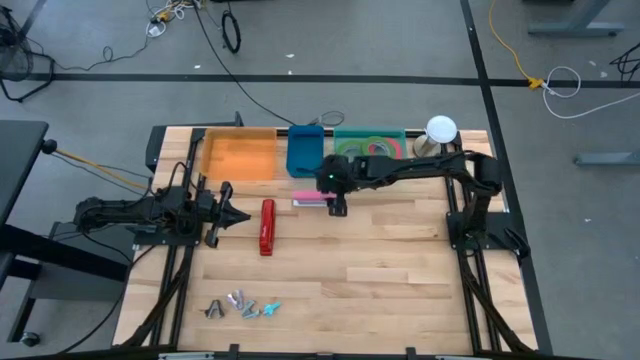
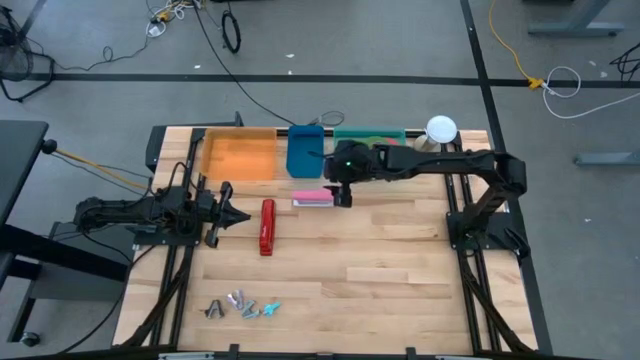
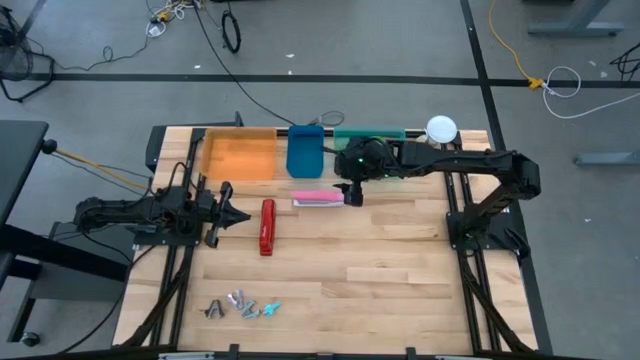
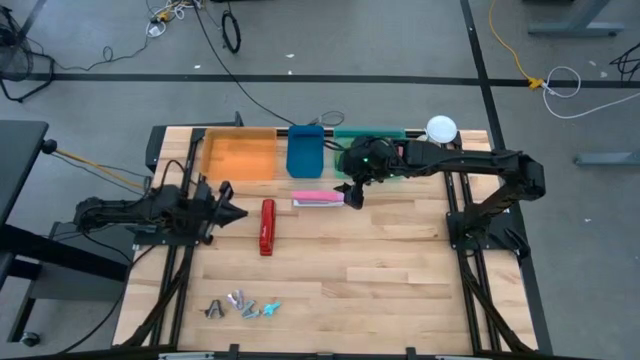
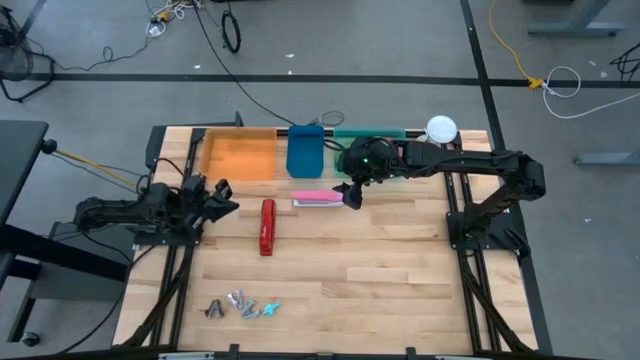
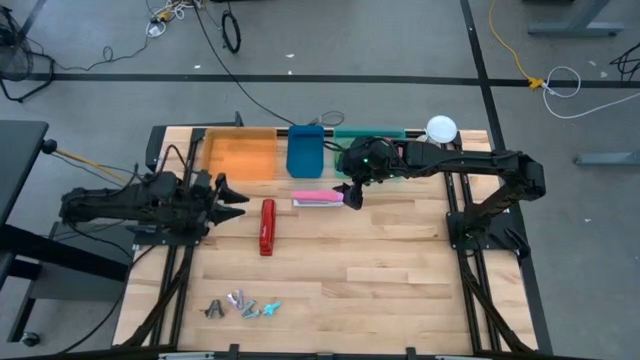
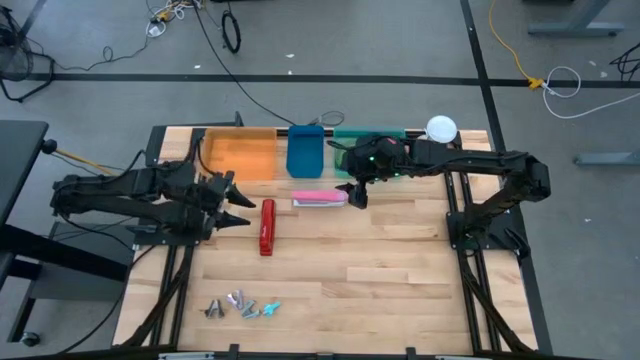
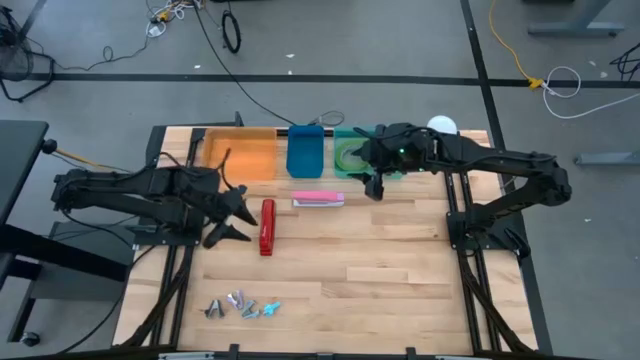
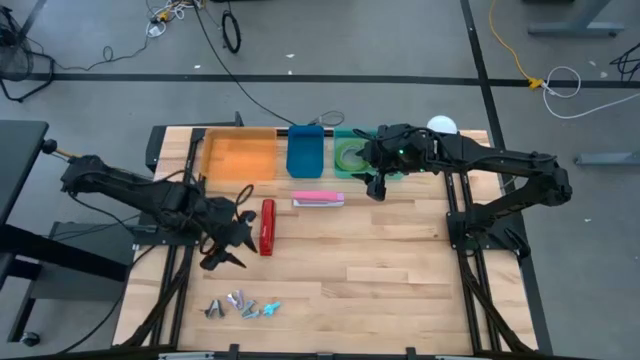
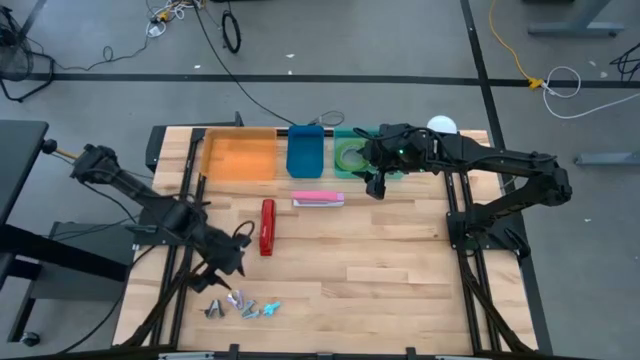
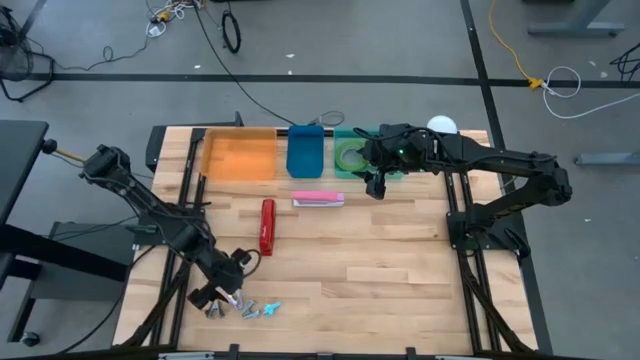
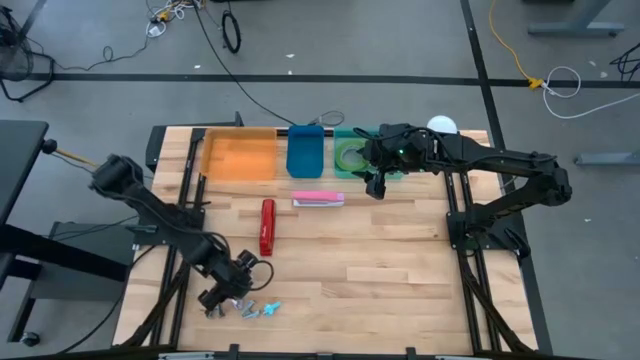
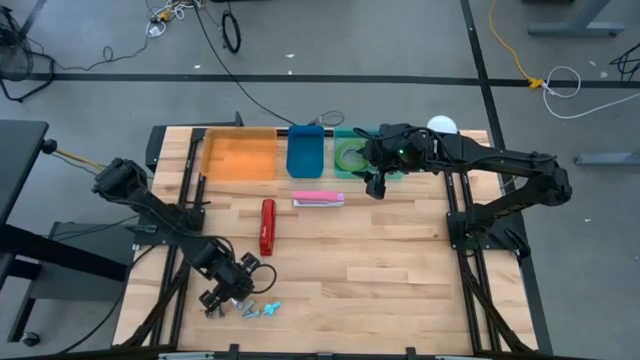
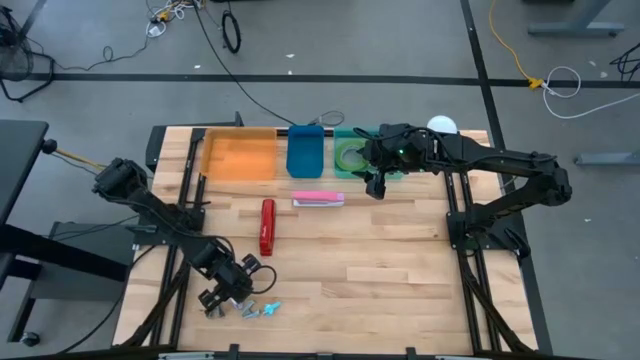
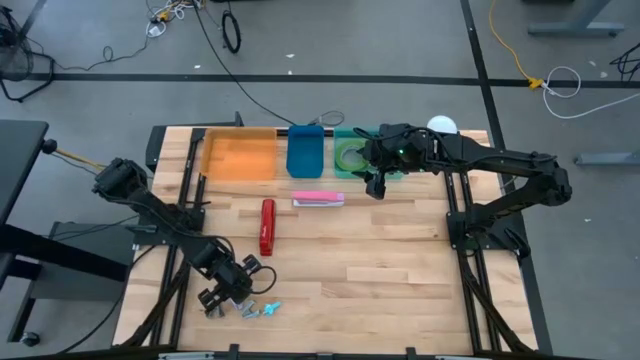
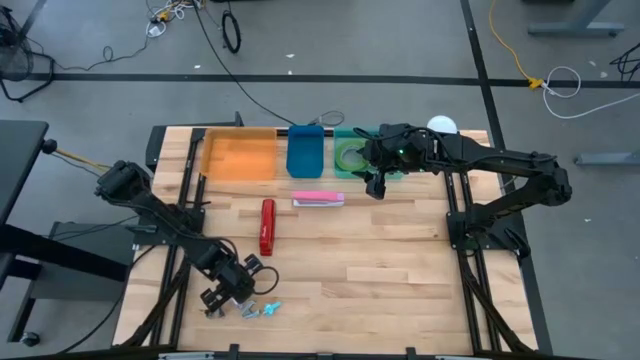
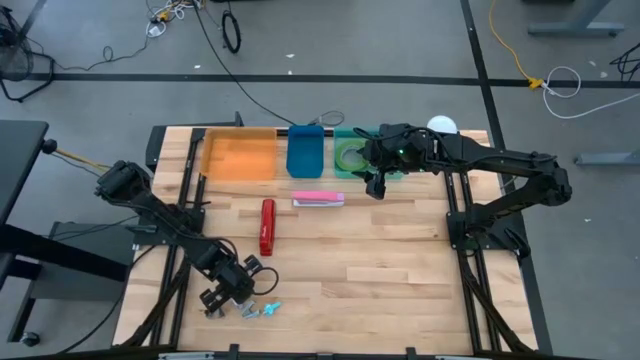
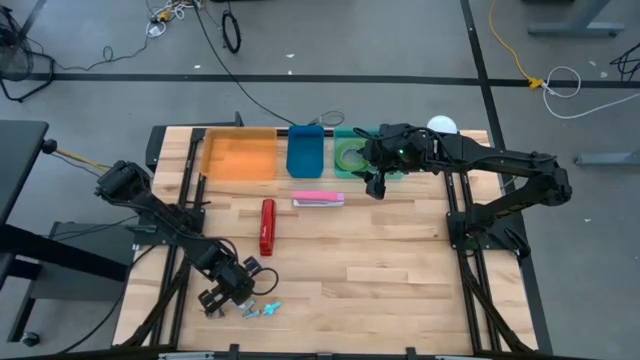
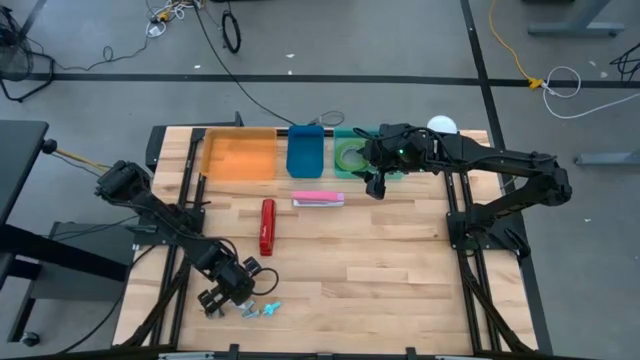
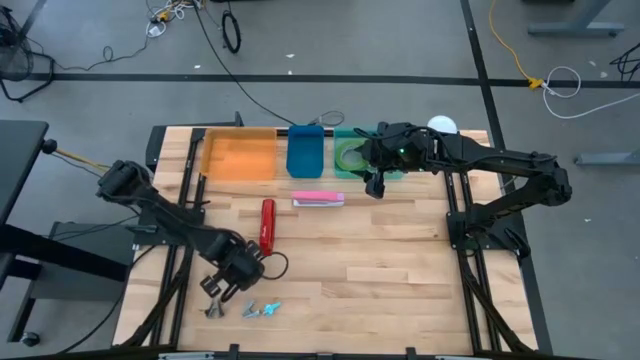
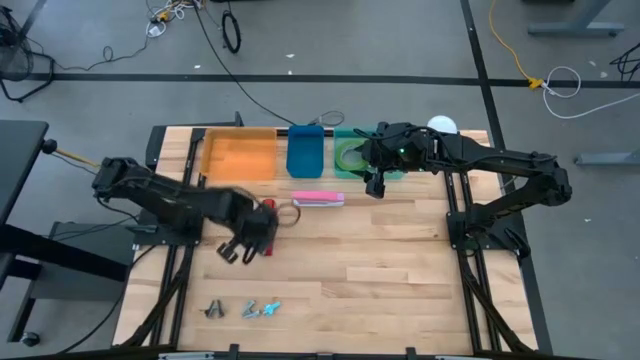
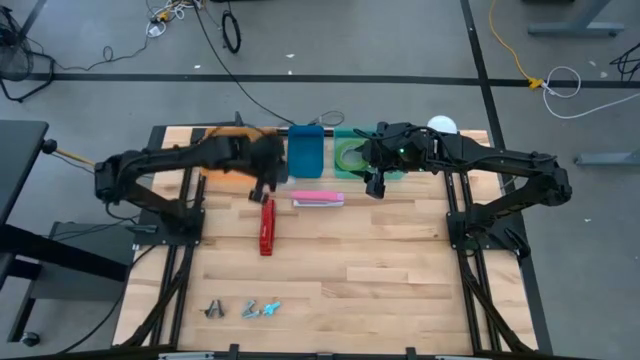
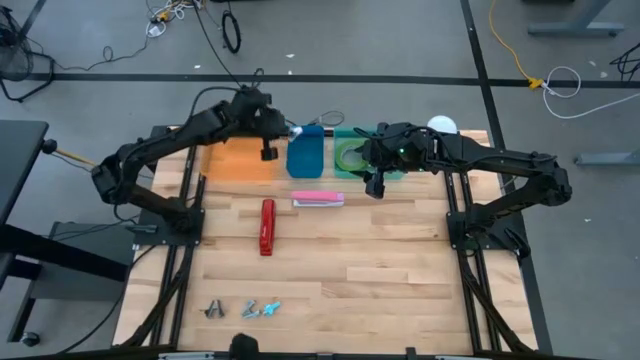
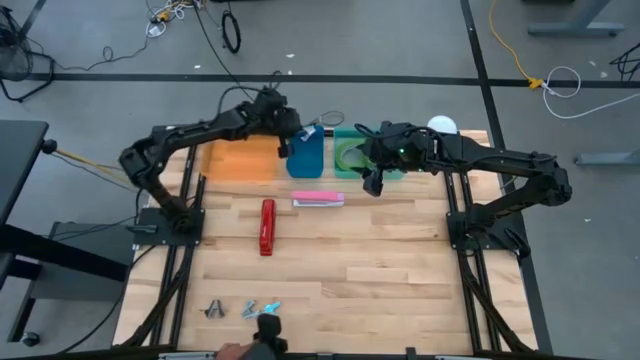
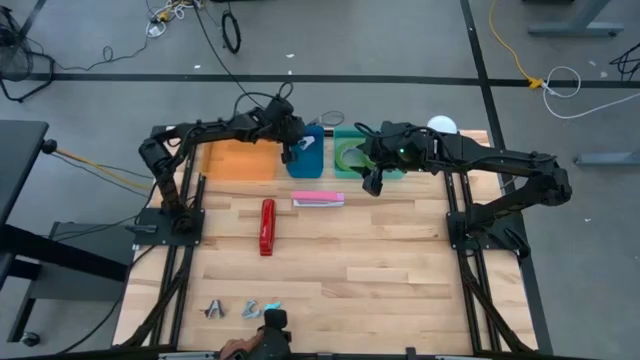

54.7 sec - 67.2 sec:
Task: Pick and place Stapler, Stapler remover, tape
Put the purple staple remover into the blue bin

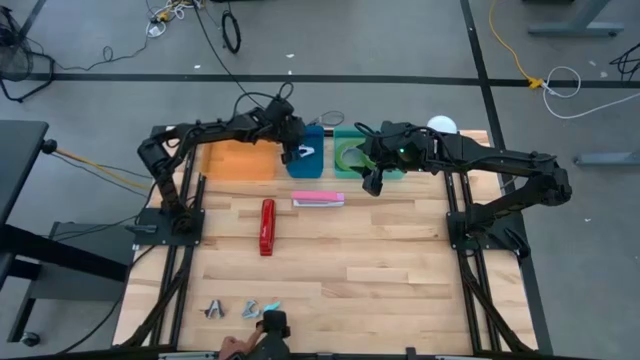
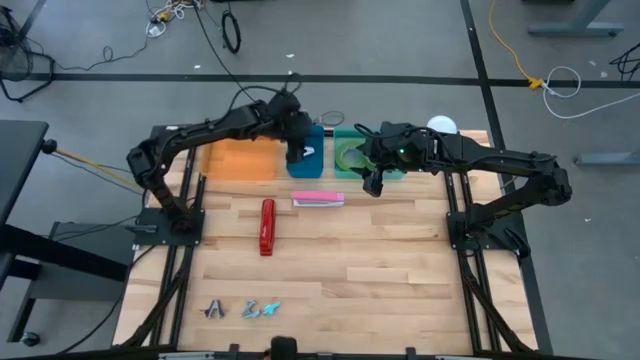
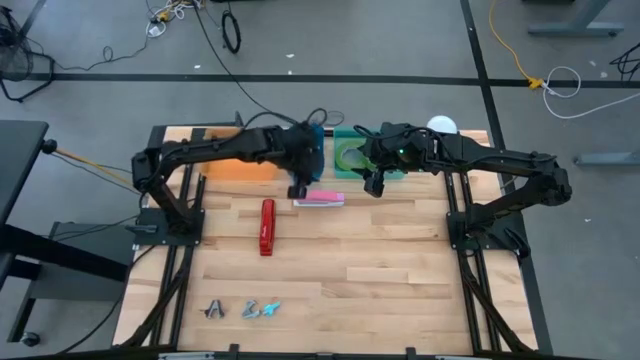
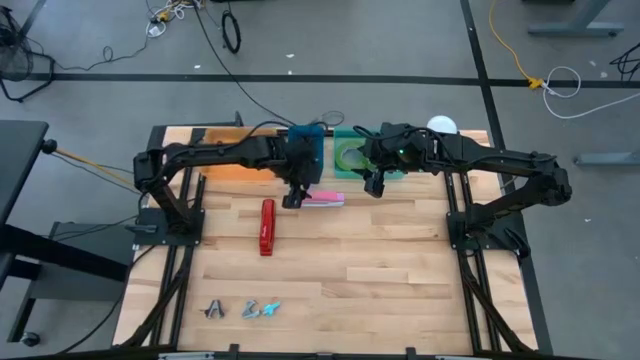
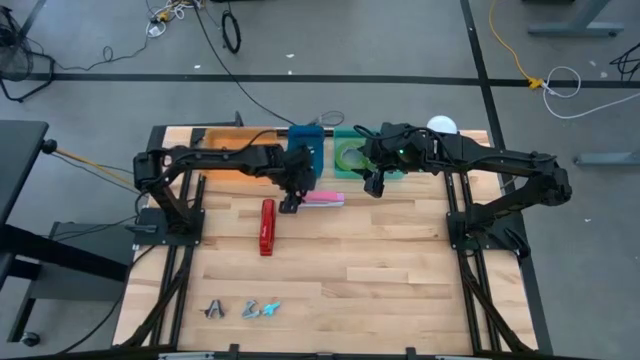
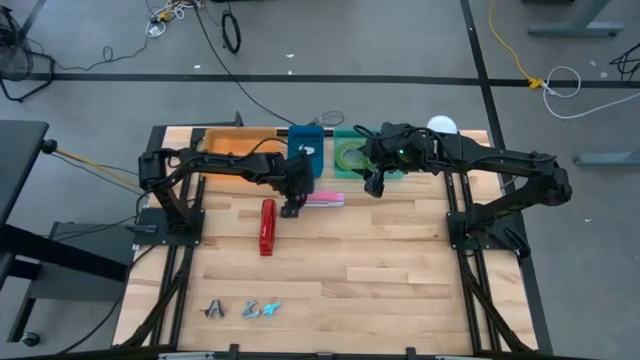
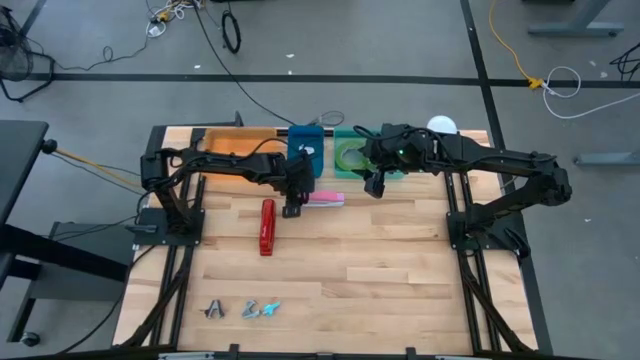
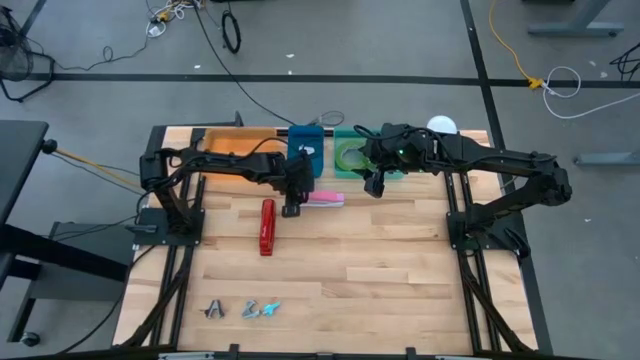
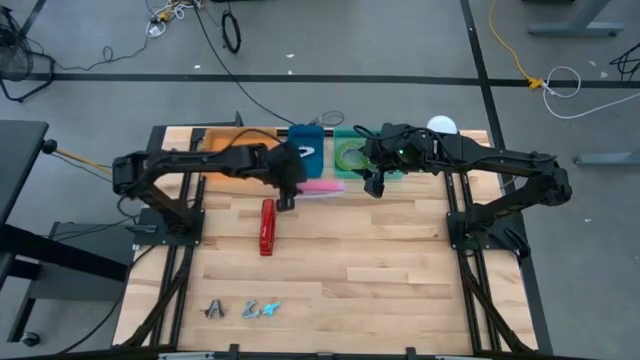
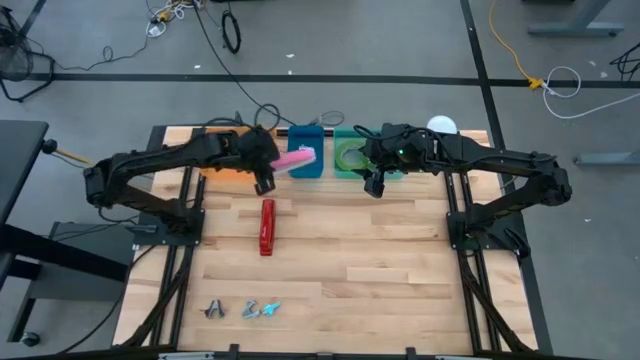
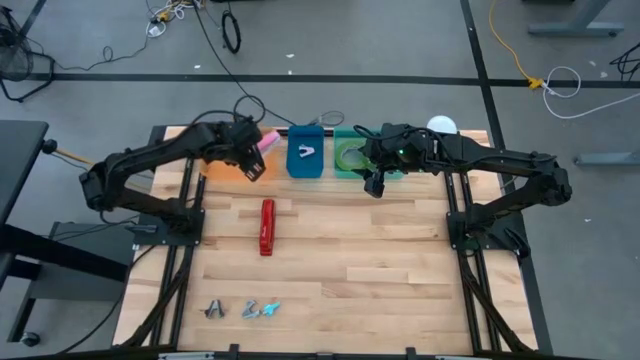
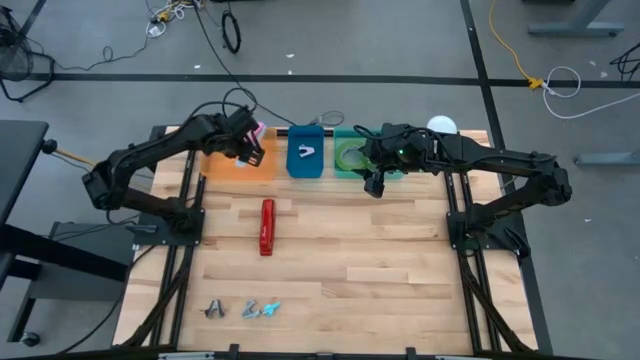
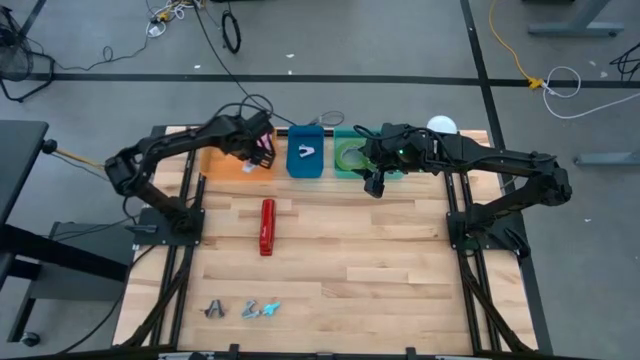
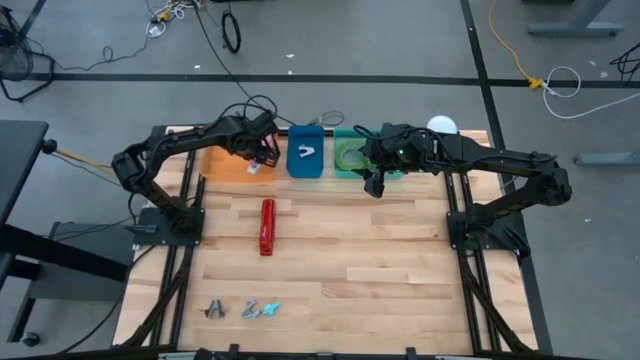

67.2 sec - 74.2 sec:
Put the pink stapler into the orange bin
